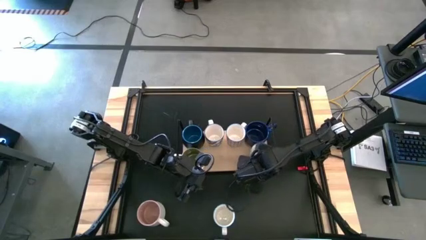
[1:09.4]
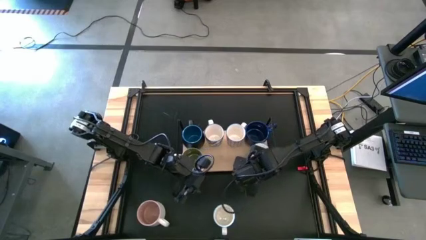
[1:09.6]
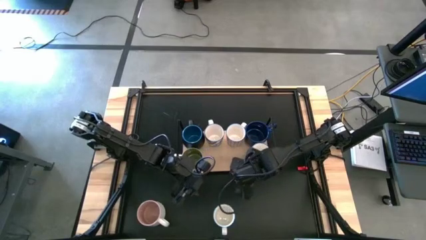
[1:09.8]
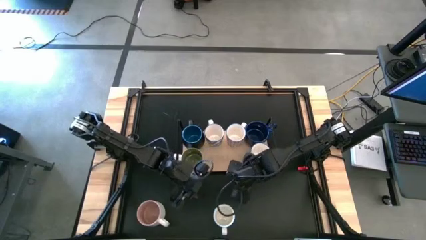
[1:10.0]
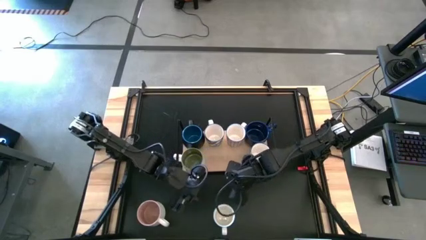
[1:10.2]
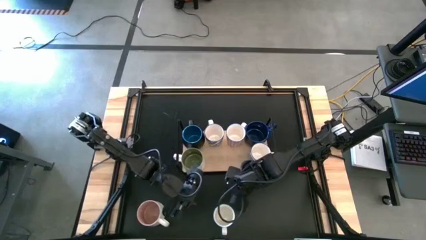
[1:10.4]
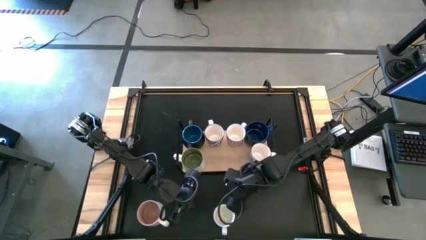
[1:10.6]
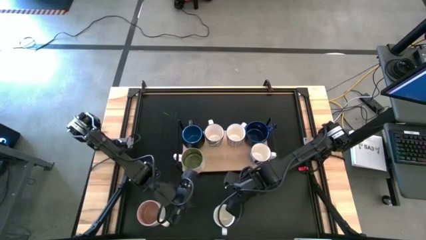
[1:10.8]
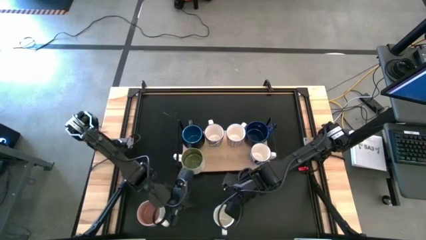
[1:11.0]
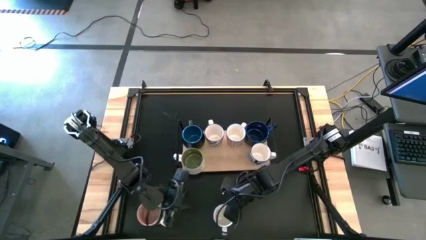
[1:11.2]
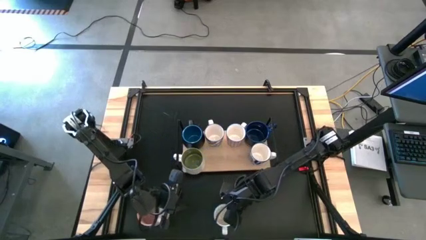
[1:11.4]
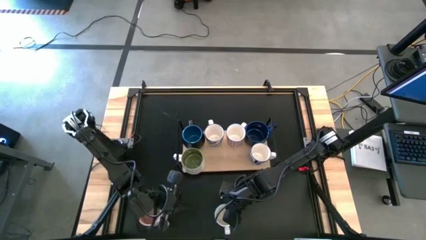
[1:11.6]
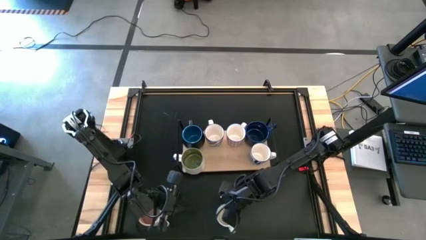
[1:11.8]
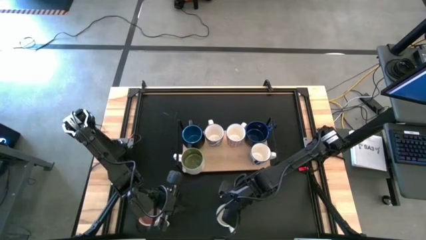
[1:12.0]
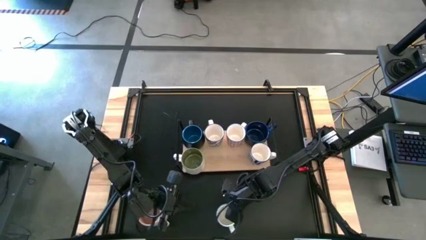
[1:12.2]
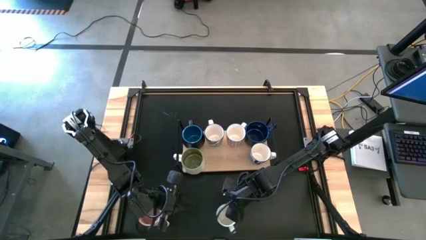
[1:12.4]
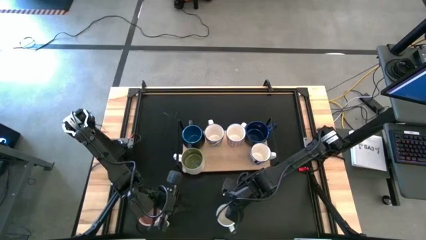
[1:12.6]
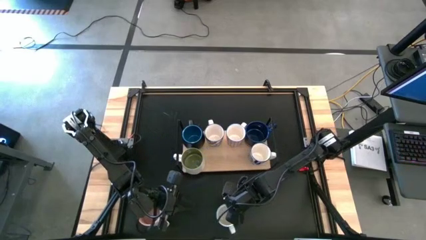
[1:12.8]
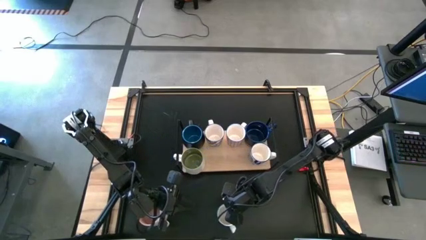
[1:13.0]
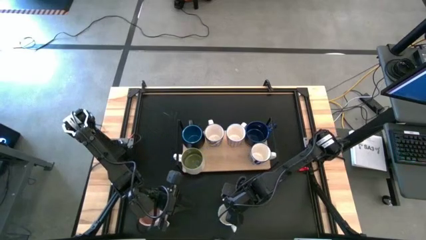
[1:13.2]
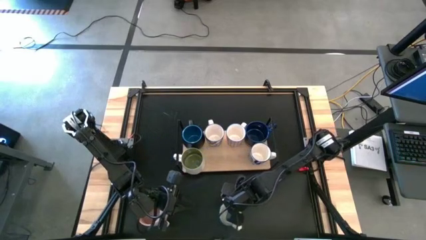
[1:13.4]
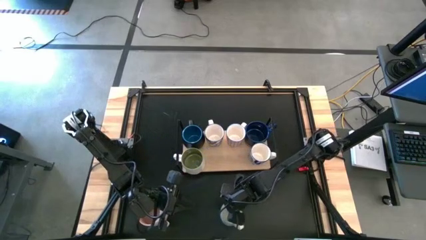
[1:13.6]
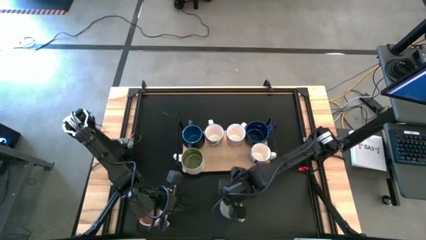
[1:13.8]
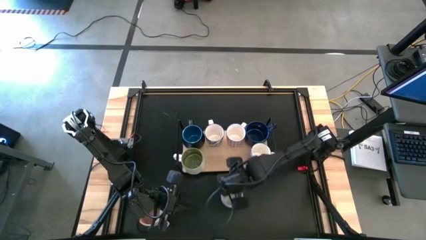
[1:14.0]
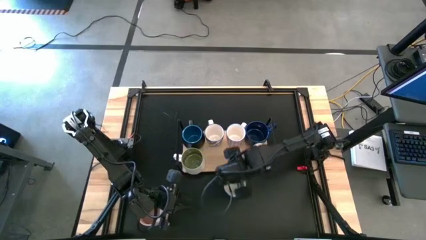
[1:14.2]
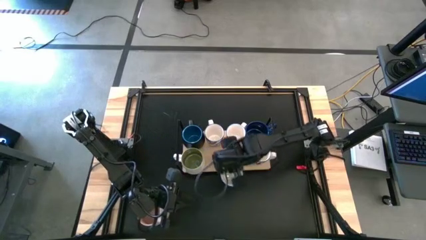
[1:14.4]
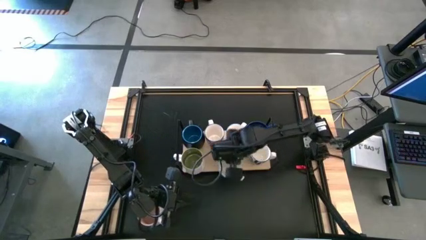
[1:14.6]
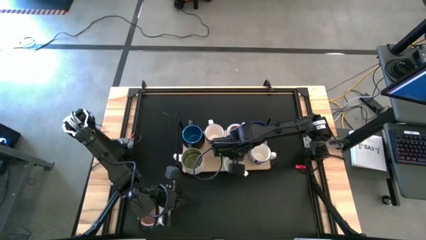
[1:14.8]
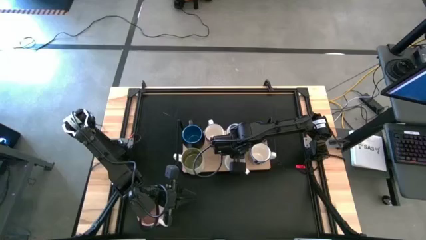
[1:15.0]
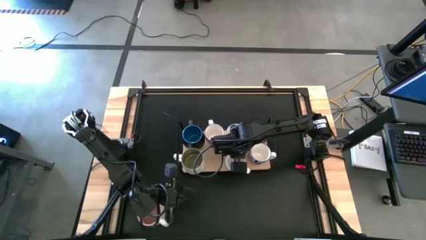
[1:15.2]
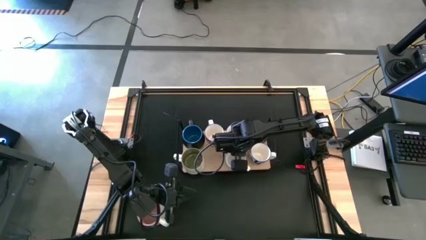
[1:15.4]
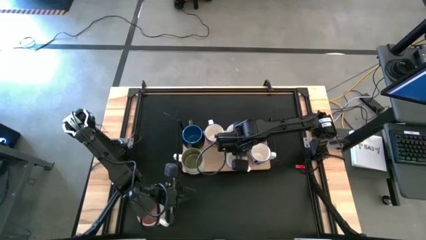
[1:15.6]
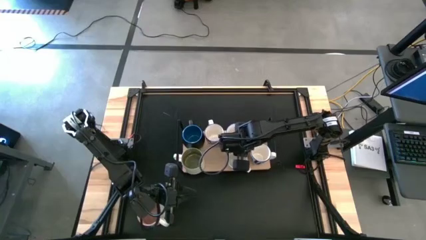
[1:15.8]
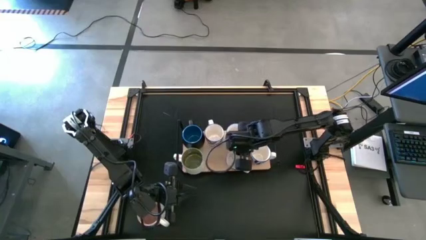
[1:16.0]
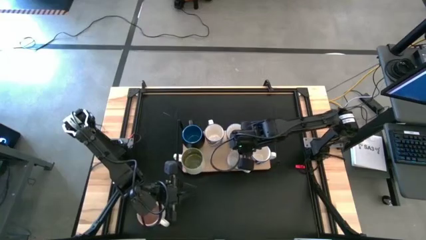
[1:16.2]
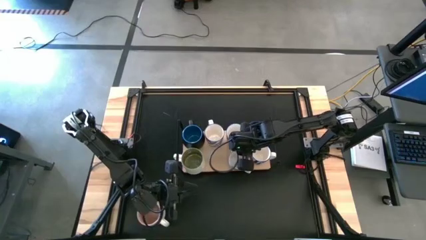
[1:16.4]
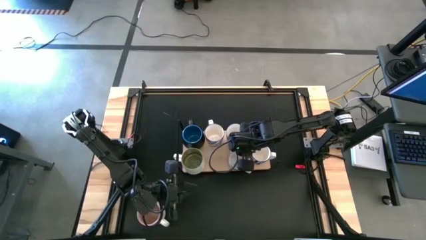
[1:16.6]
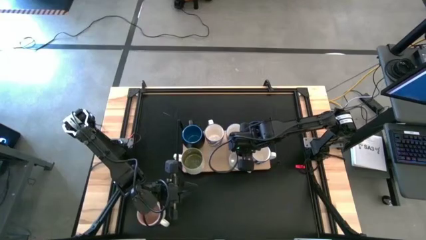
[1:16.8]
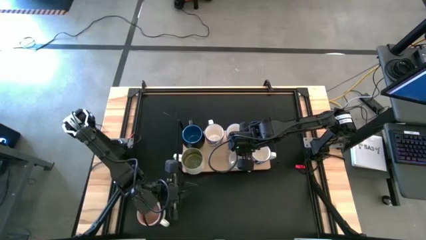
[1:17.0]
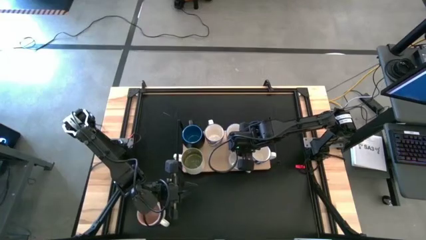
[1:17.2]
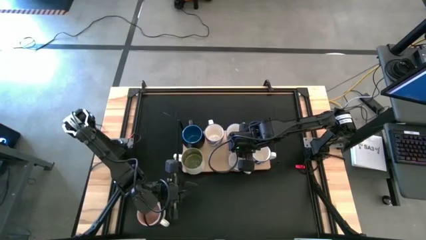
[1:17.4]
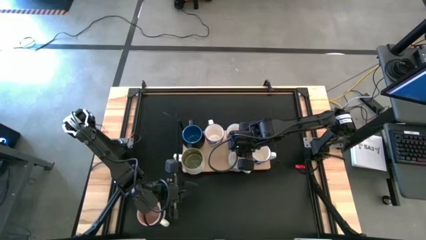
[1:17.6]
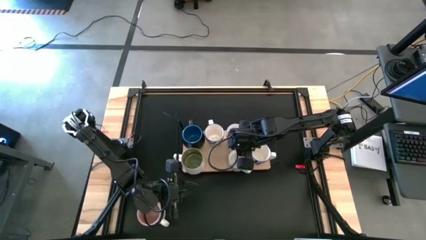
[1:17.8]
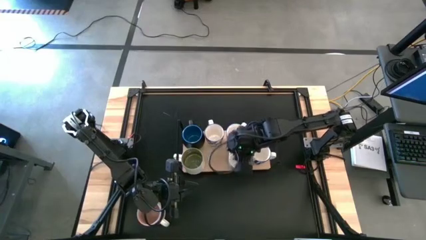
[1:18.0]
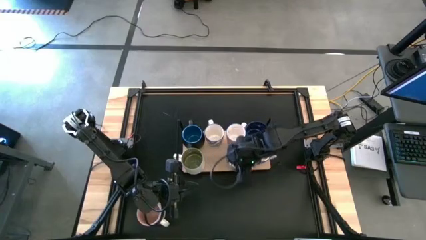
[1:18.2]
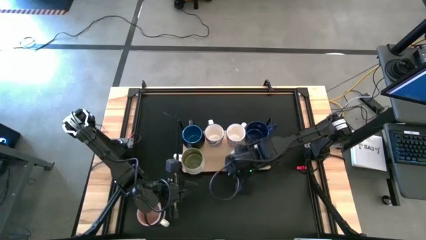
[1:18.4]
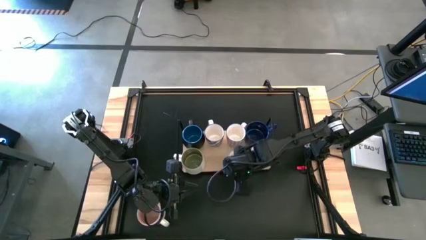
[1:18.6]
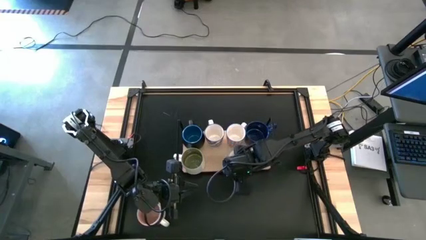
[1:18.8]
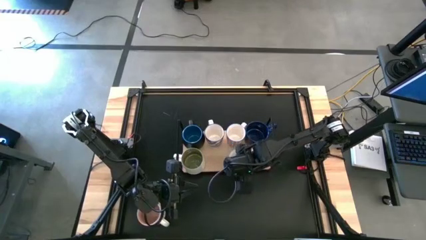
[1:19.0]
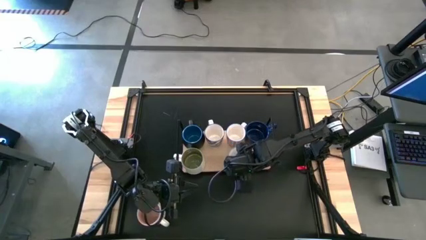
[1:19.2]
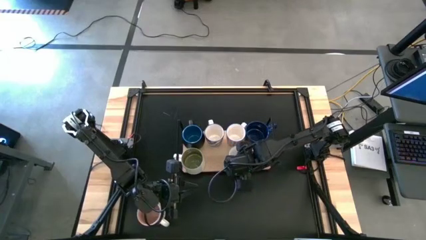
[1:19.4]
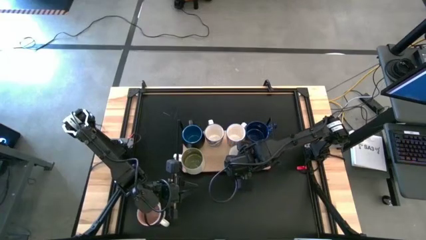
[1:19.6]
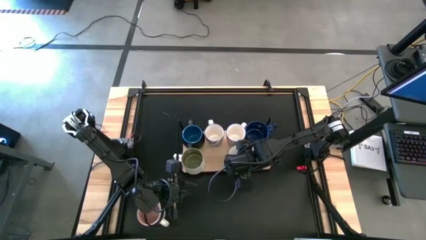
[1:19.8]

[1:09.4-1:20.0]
Task: Place coffee mugs
Put the gray patterned mug on the shelf

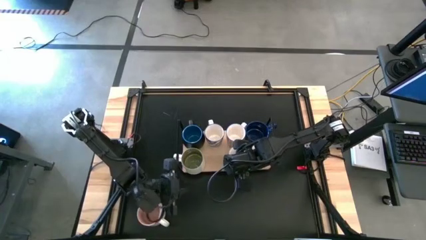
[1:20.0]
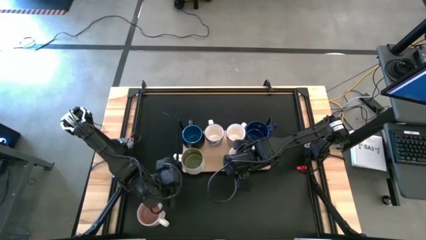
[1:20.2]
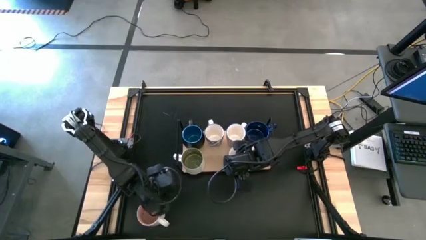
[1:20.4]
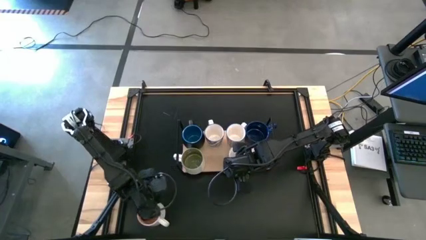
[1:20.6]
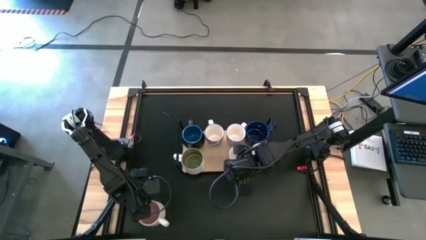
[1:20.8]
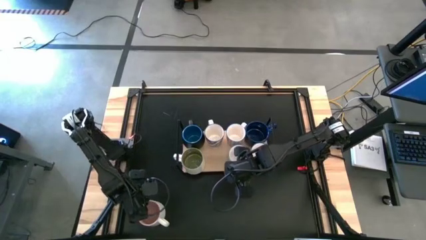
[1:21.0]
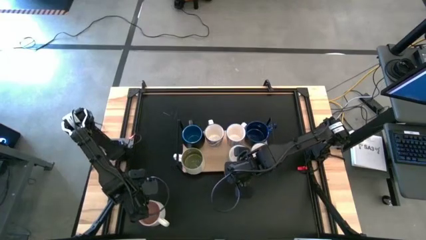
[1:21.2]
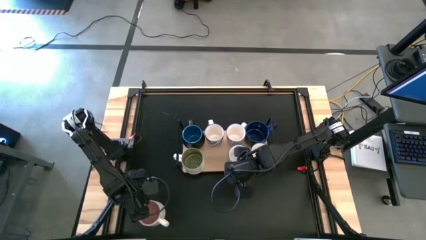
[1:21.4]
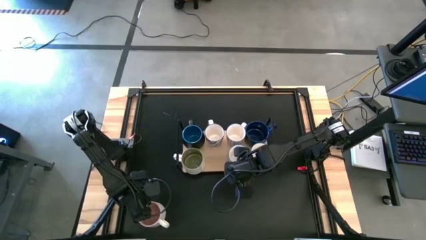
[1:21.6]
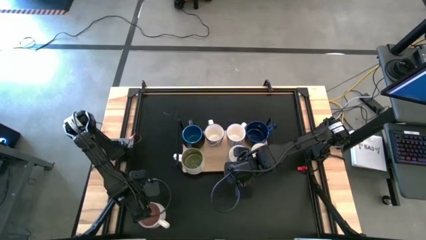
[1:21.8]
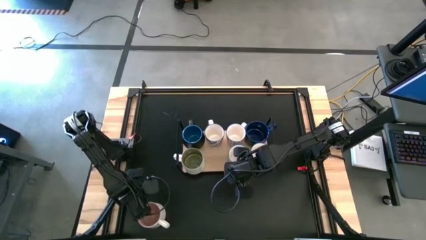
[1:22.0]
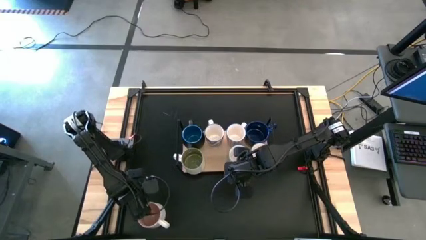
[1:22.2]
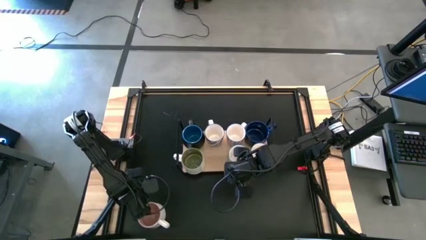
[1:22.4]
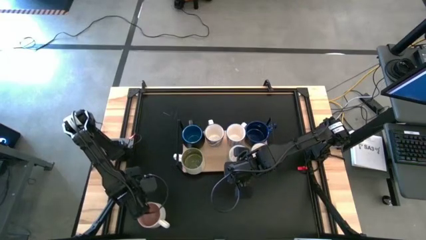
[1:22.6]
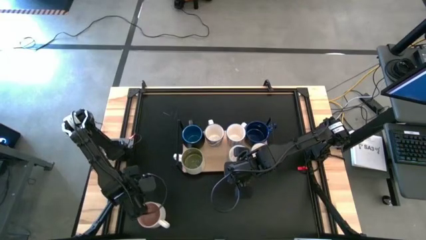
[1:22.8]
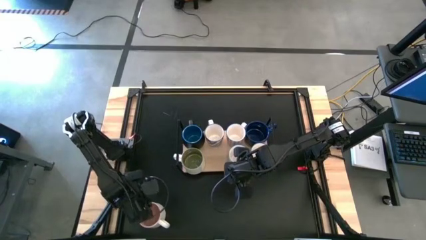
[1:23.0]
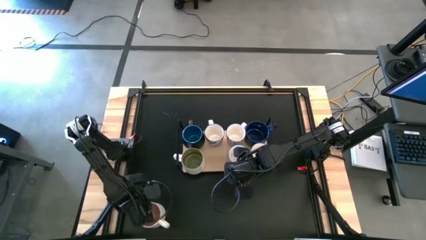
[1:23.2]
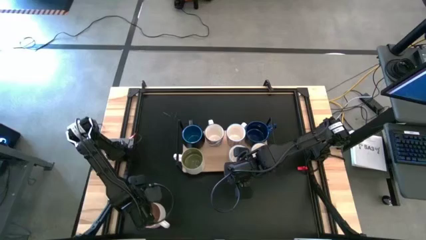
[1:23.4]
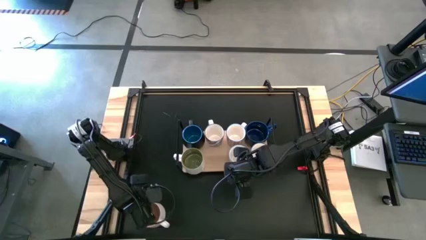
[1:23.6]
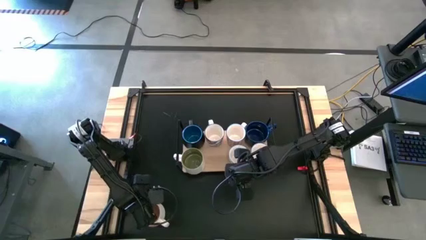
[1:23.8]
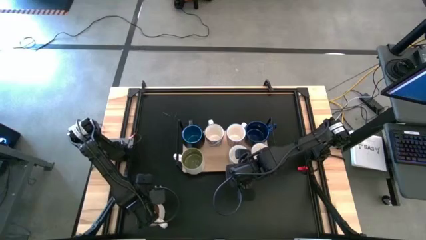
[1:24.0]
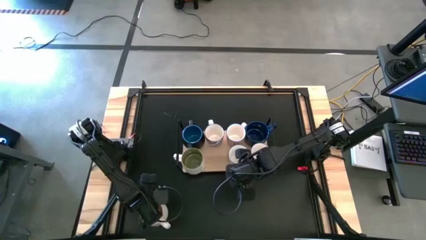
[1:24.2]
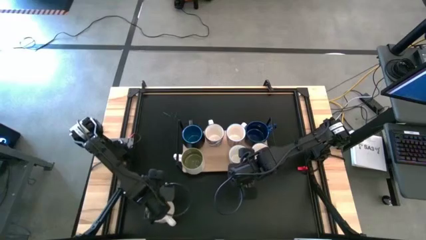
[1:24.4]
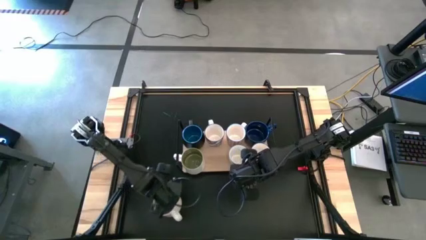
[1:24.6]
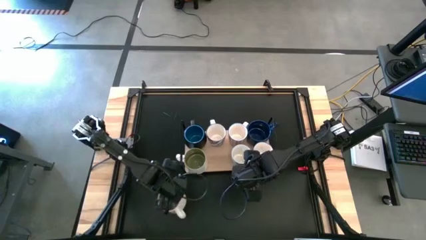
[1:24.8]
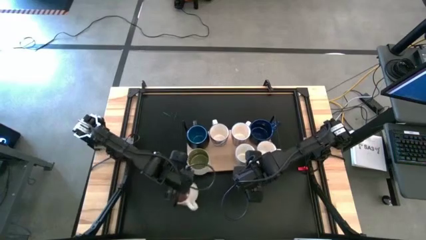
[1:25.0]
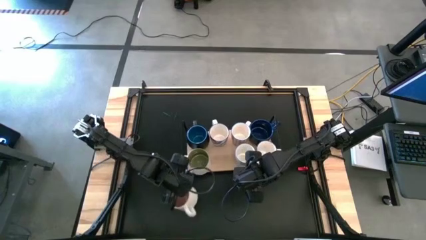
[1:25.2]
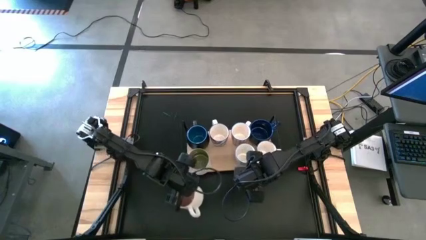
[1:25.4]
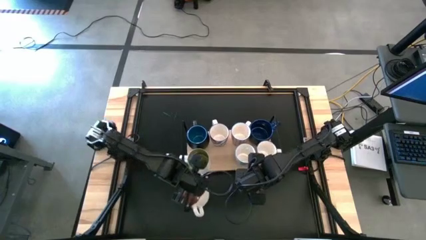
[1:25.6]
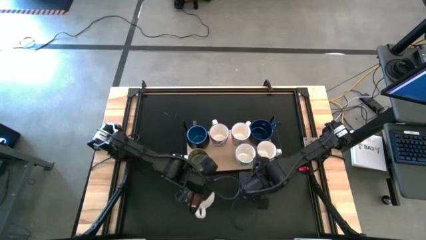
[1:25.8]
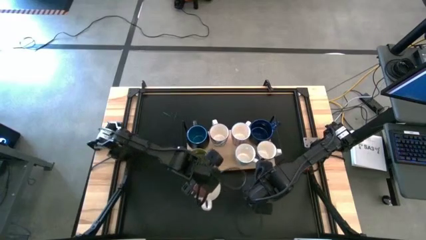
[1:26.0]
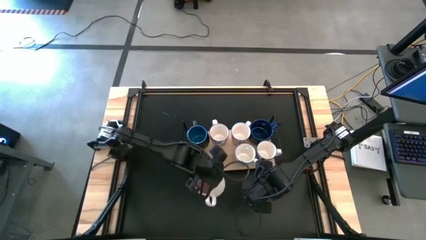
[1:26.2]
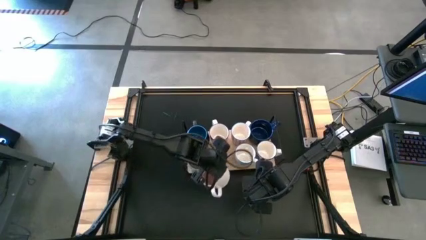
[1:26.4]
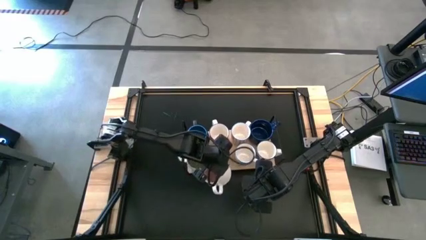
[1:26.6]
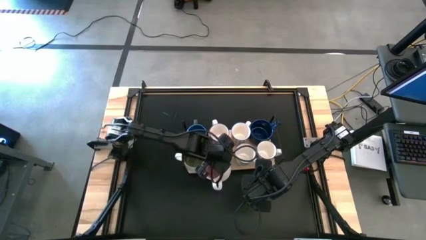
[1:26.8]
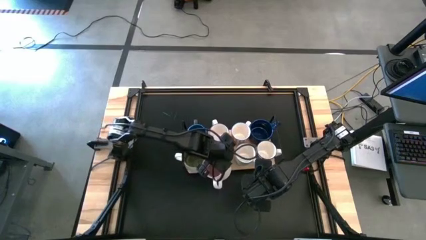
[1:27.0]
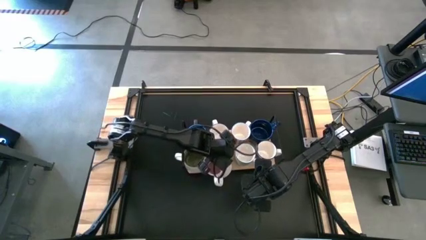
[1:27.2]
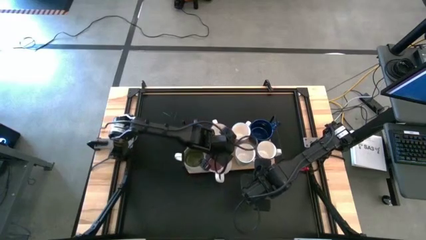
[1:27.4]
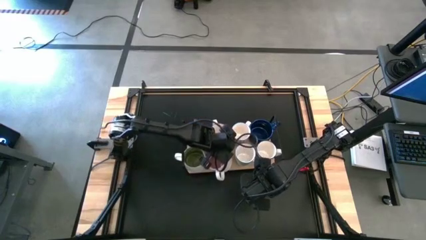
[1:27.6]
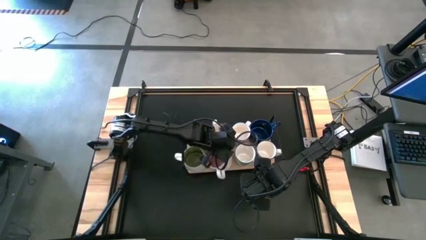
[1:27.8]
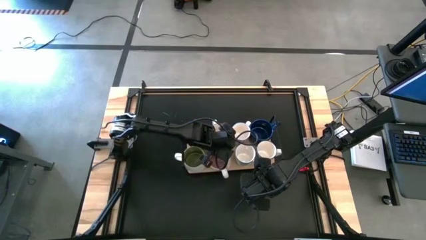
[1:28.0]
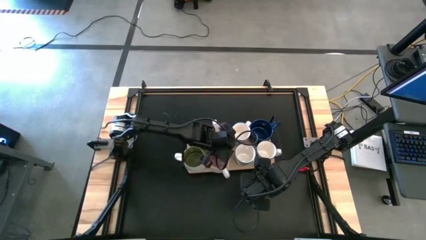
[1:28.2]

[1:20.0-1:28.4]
Put the pink mug on the shelf
